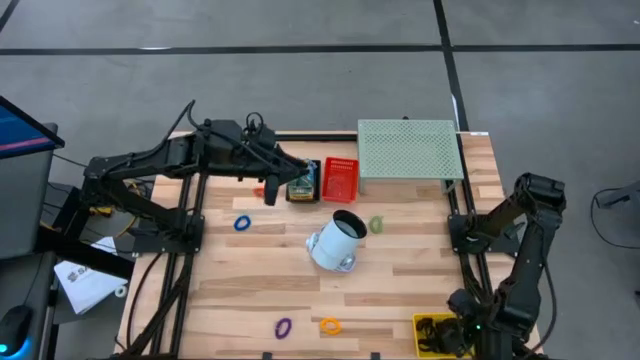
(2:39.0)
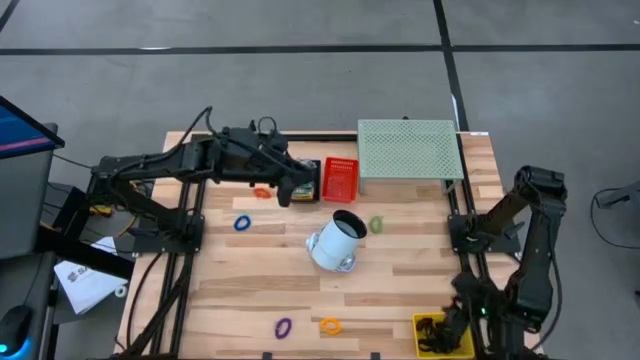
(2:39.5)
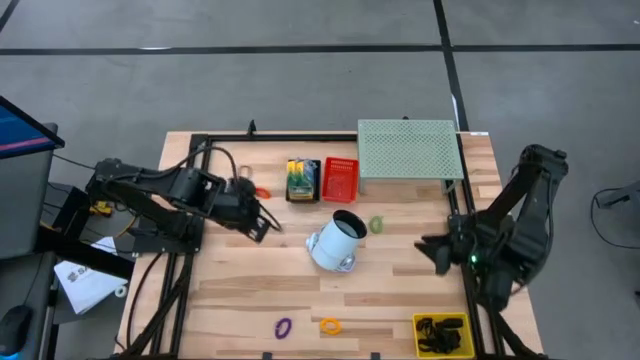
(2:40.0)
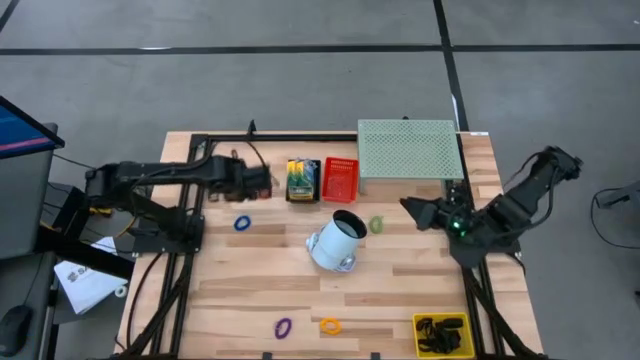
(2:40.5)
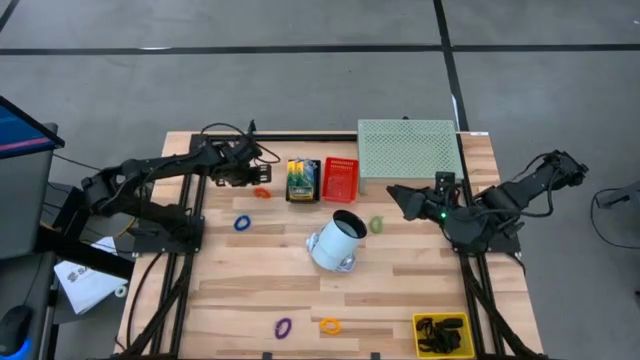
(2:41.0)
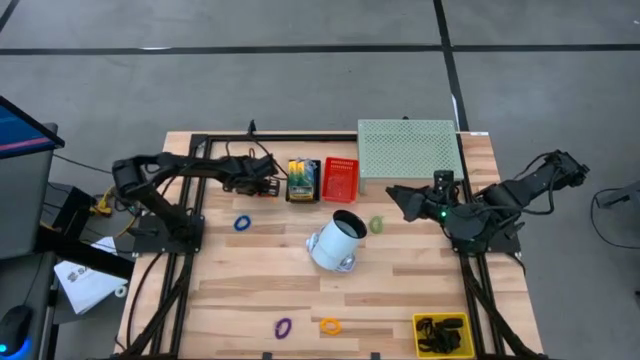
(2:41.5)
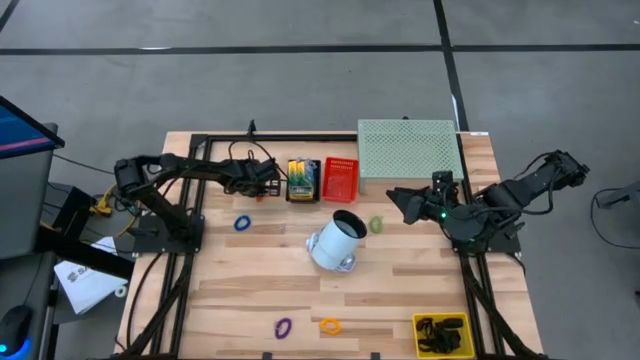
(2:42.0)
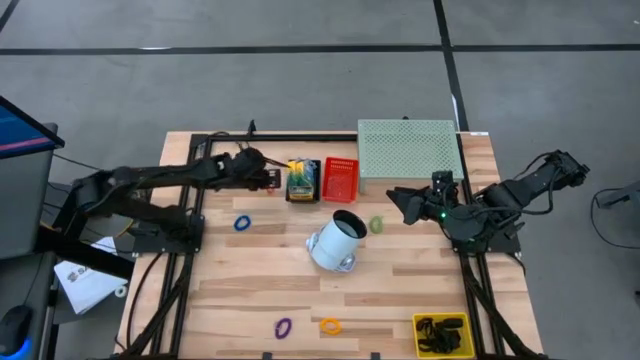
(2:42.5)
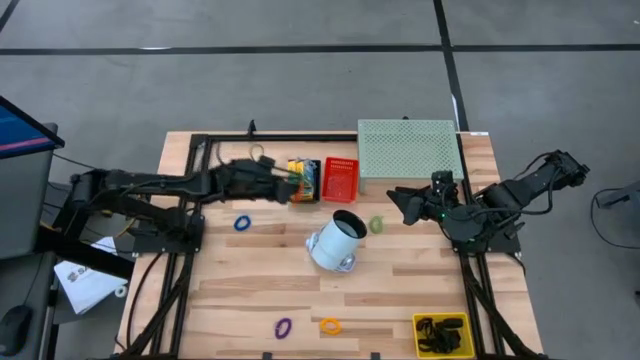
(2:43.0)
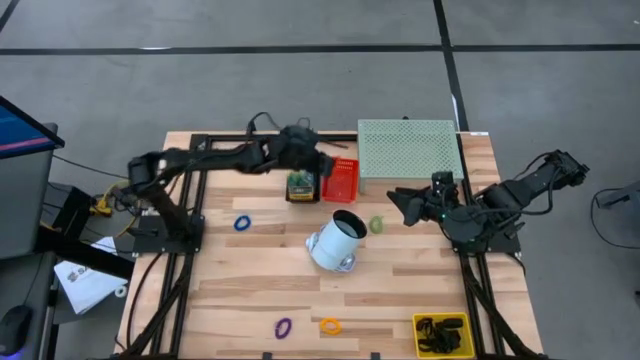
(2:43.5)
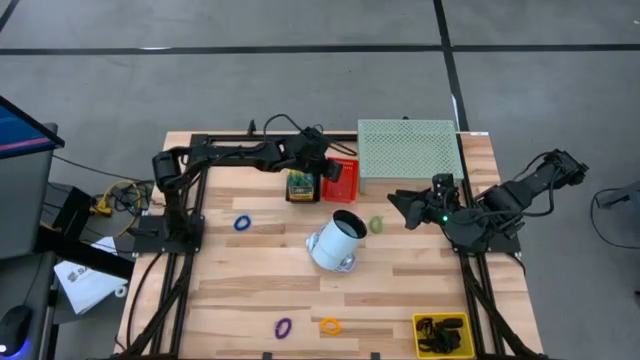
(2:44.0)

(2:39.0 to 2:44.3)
Task: Pick & Place Office Desk Supplies
Put the orange spring rubber band into the red bin

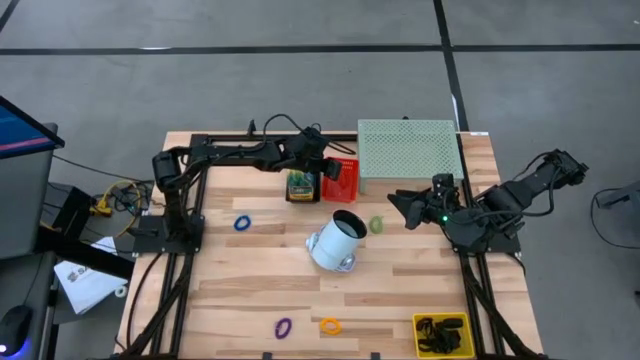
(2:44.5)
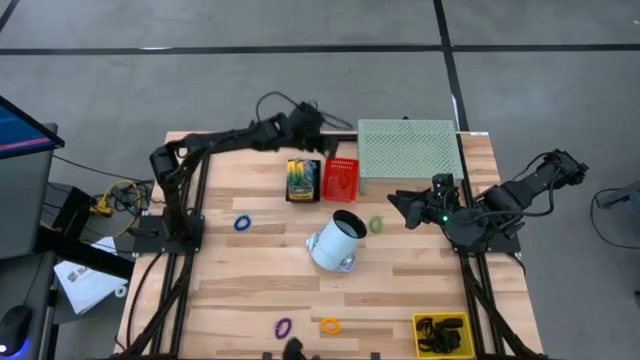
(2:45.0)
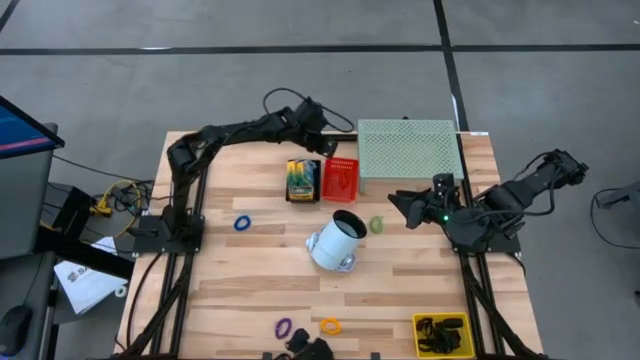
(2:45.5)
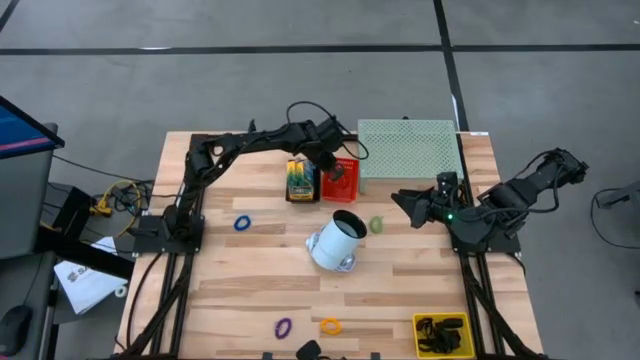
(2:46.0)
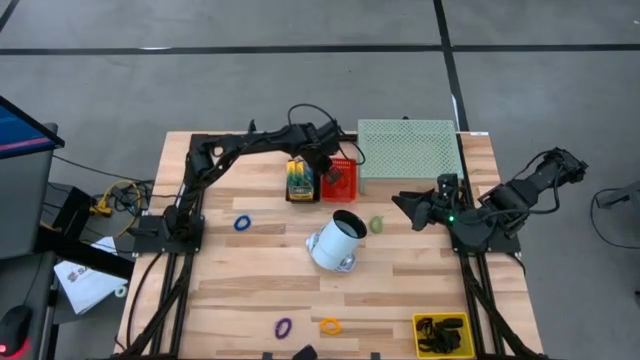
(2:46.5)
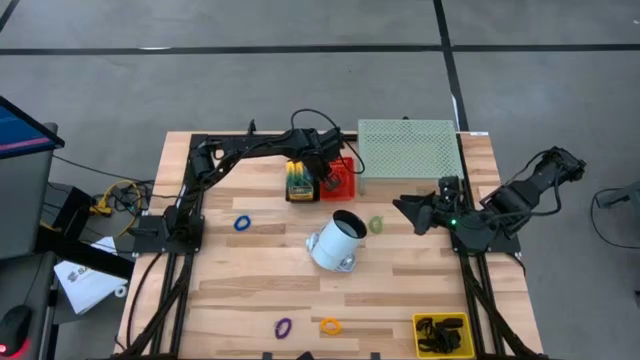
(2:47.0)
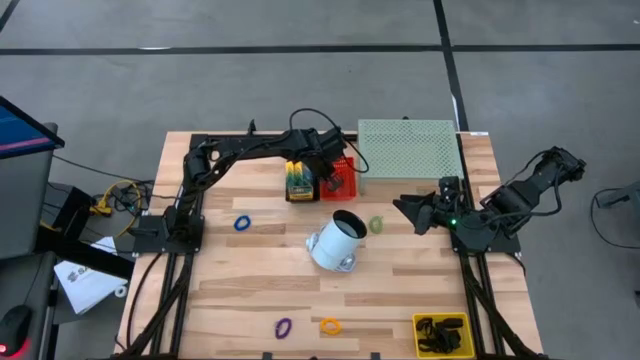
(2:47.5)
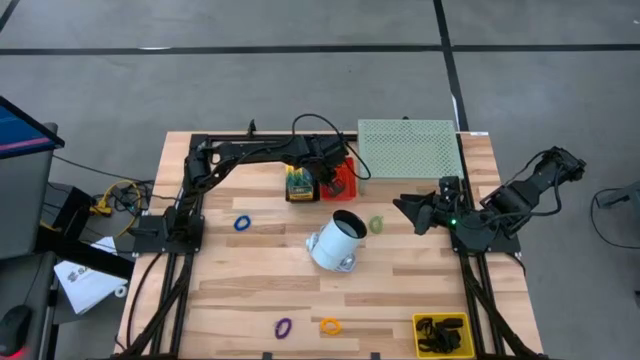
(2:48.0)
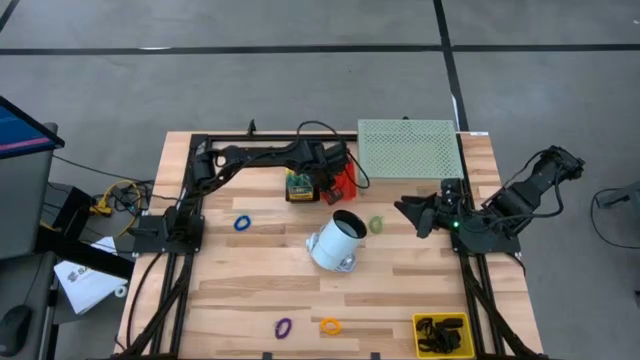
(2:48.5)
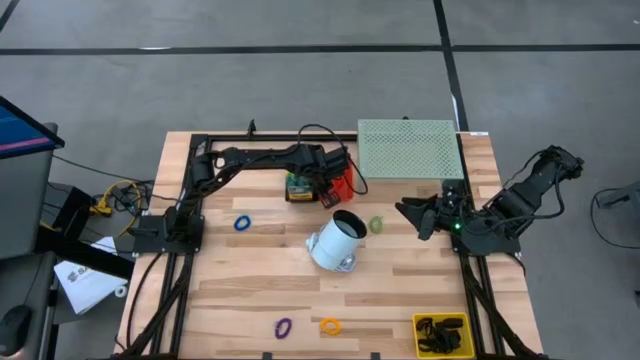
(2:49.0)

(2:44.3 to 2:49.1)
Adjust the red bin

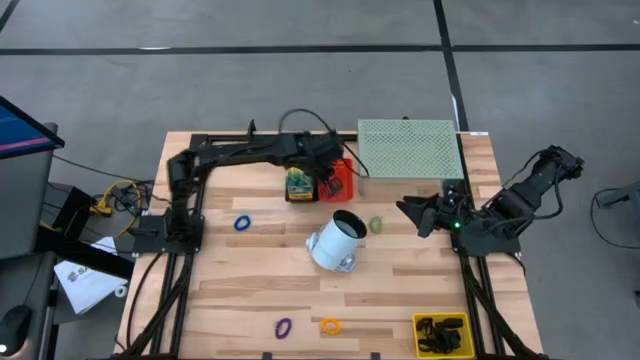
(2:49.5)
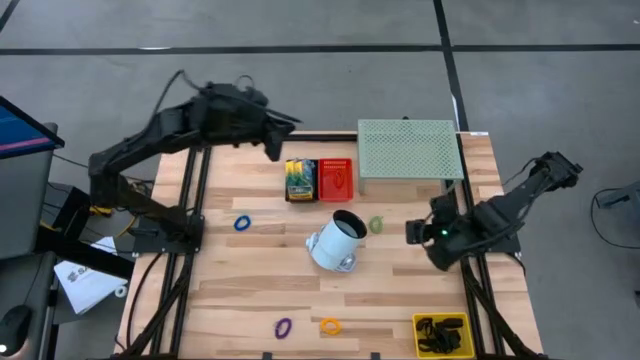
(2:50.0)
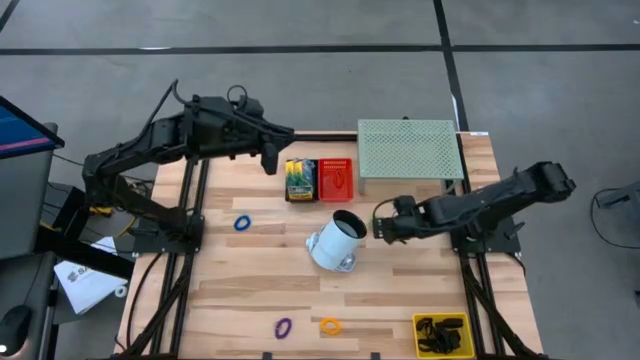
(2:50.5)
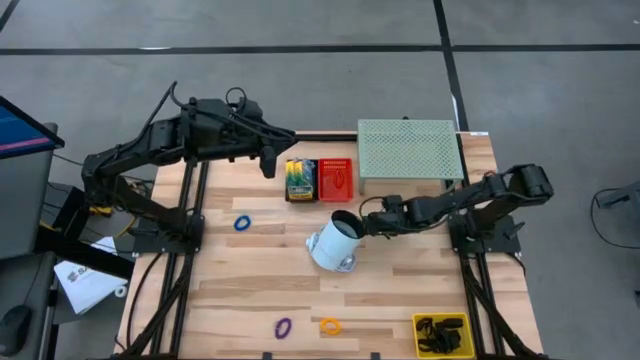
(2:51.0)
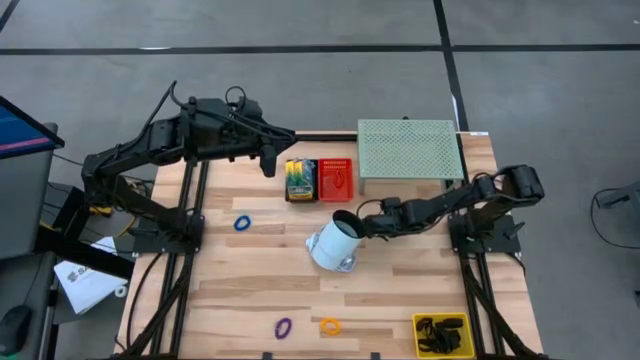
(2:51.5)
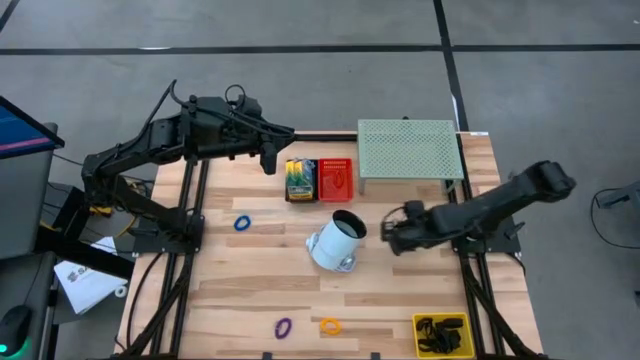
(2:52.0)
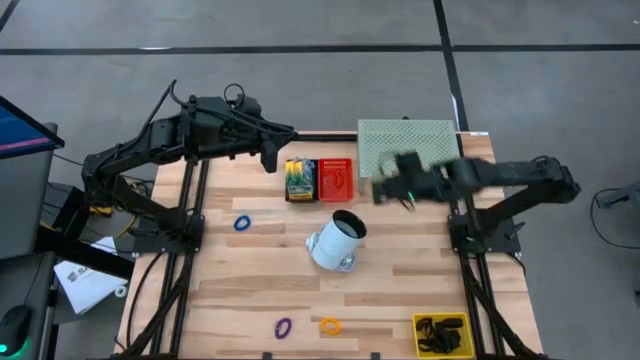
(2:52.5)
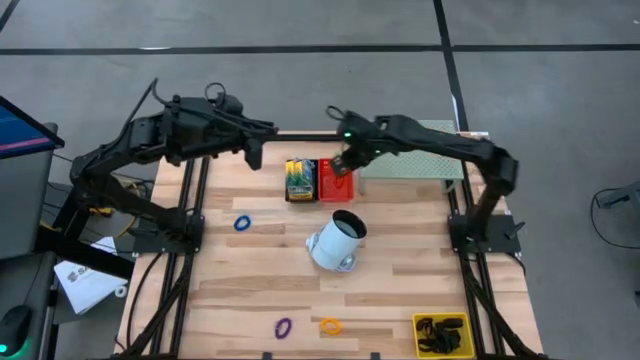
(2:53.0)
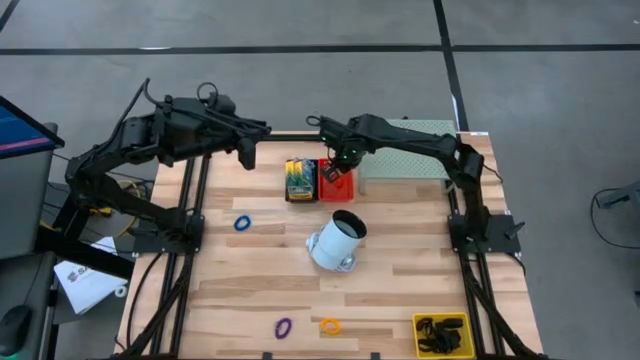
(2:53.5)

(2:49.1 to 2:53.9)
Put the green spring rubber band into the red bin

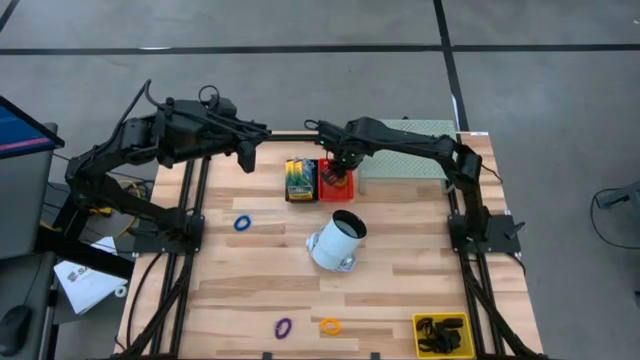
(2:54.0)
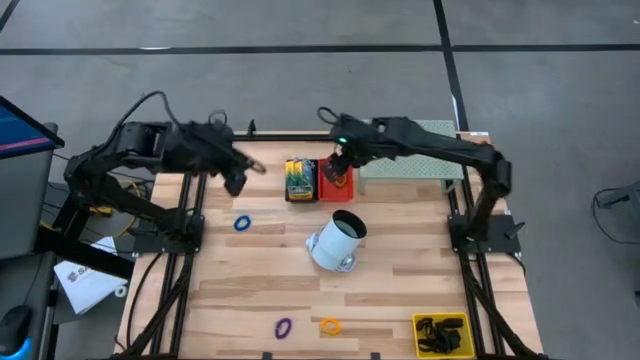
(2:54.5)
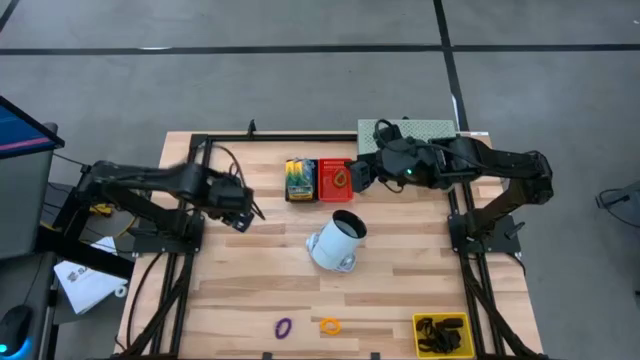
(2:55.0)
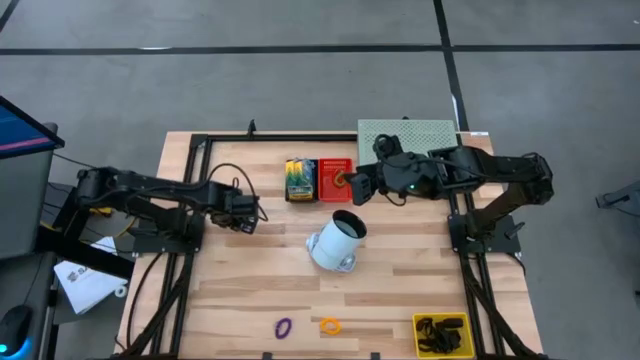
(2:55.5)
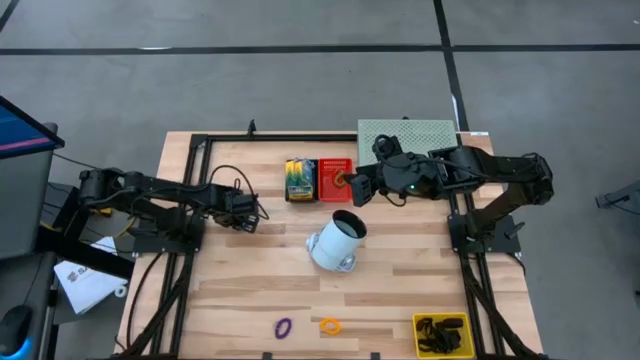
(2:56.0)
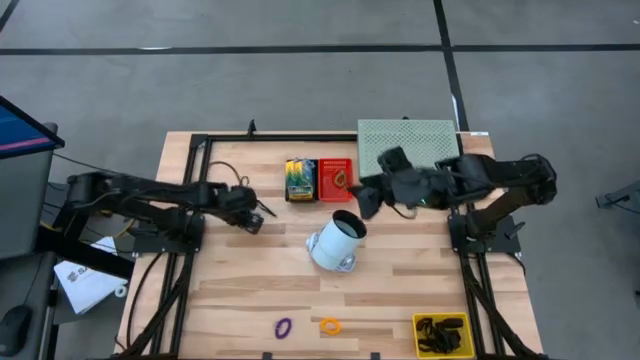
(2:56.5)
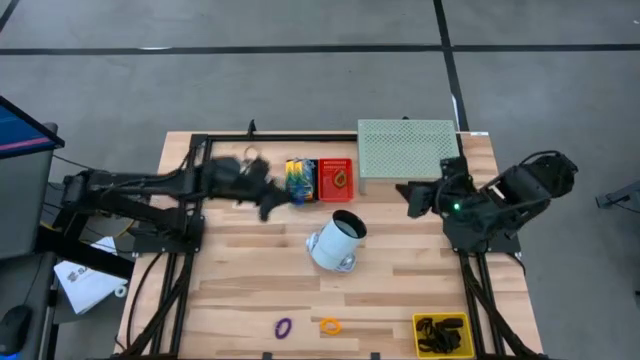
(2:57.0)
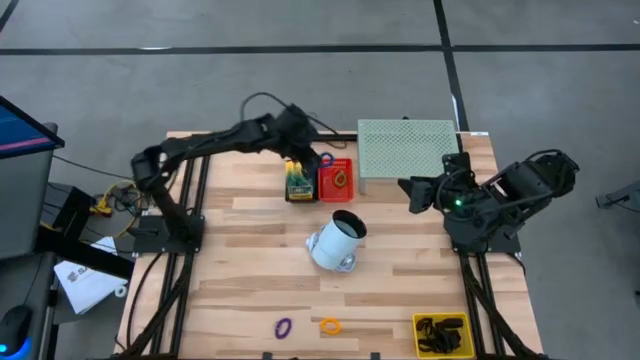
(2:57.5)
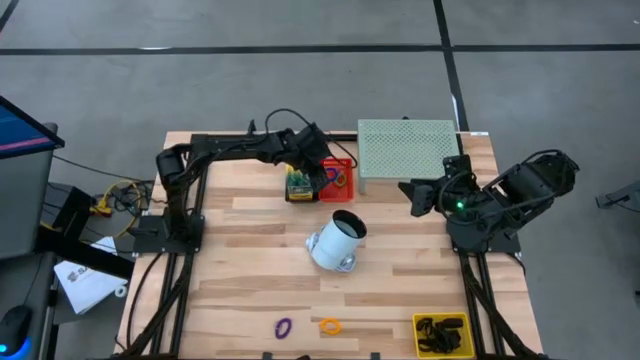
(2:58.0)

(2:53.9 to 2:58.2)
Put the blue spring rubber band into the red bin

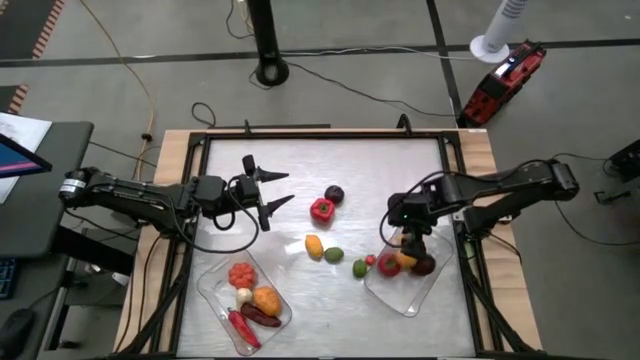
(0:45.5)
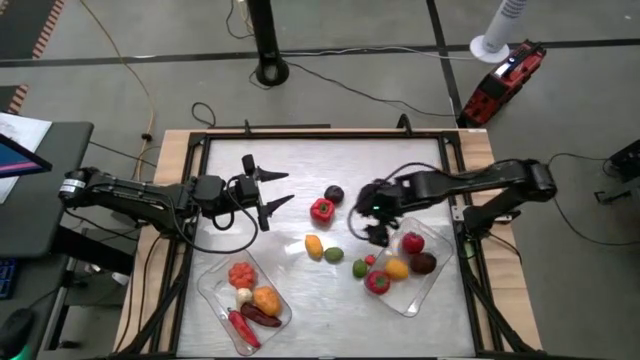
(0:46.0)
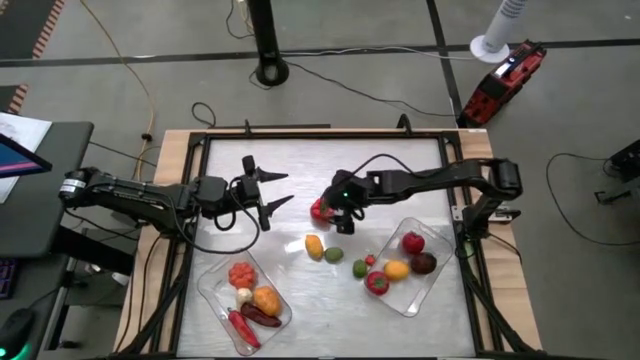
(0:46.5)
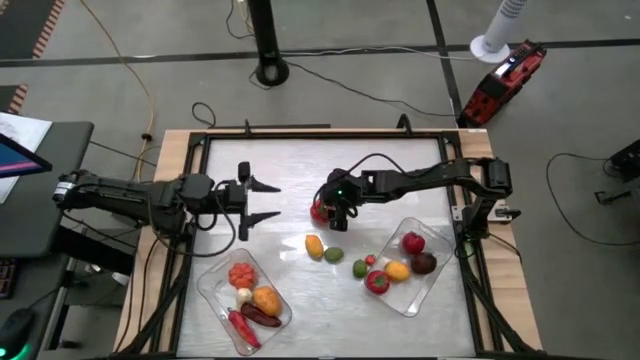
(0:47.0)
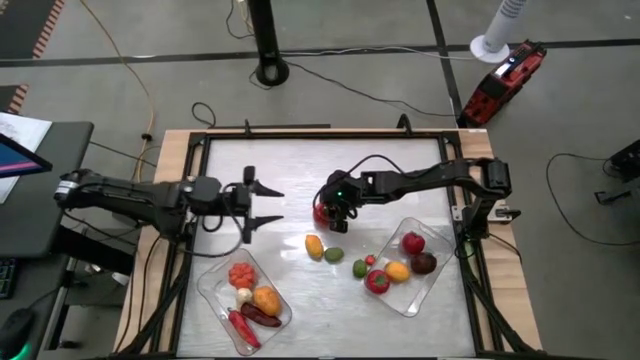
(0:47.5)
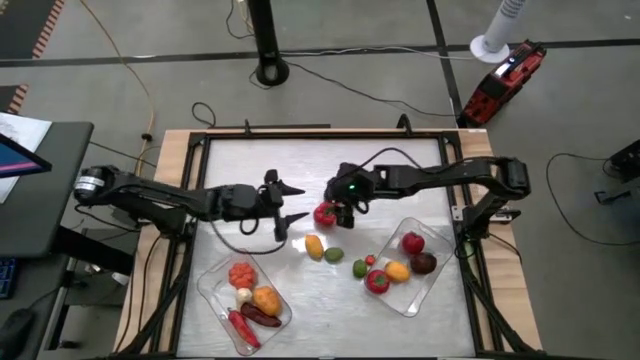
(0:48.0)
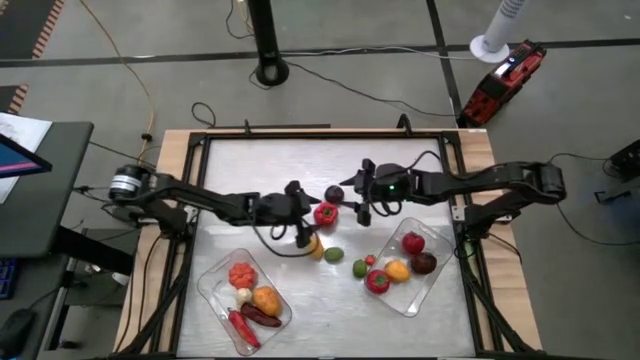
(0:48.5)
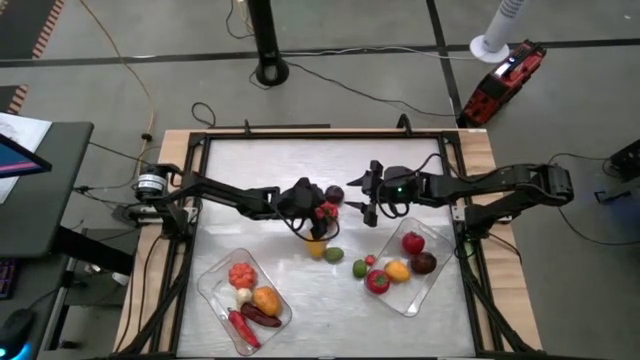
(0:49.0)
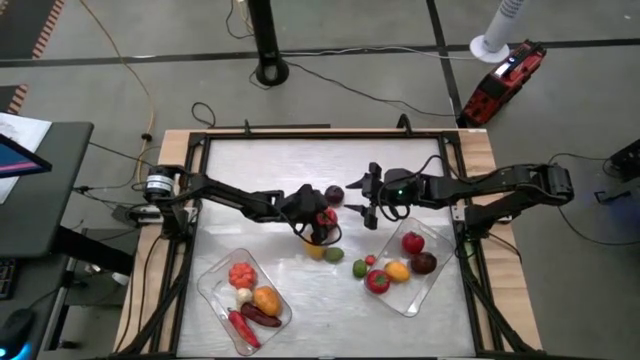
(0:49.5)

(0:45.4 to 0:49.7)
Task: Sort produce into baskets
Put the red bell pepper into the left transparent bin
